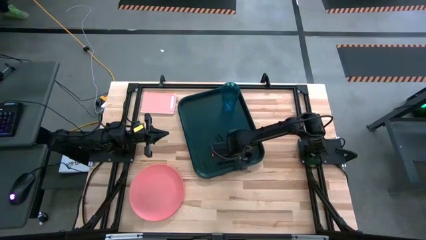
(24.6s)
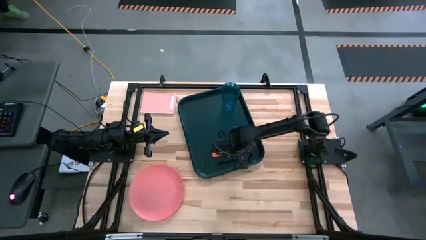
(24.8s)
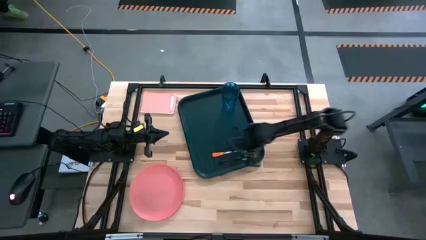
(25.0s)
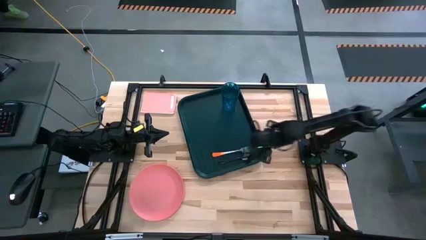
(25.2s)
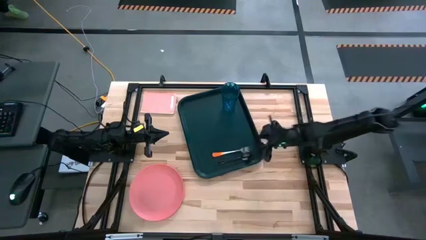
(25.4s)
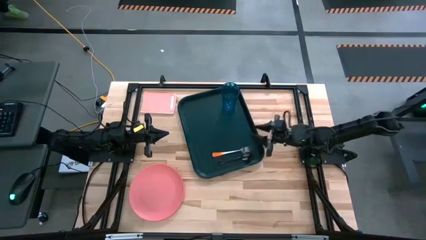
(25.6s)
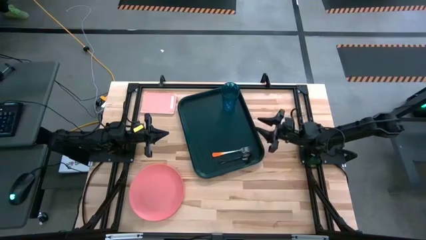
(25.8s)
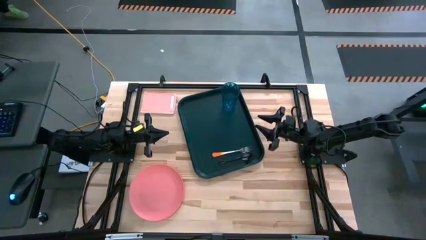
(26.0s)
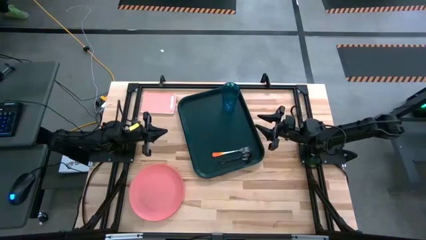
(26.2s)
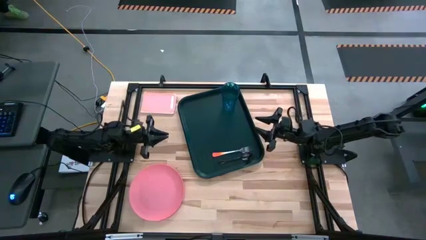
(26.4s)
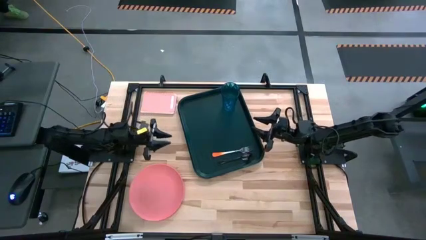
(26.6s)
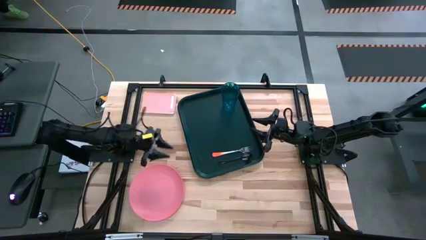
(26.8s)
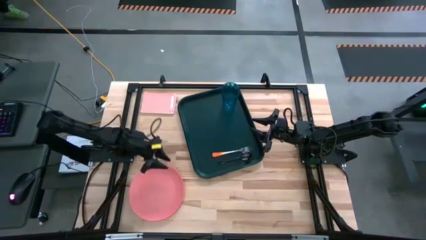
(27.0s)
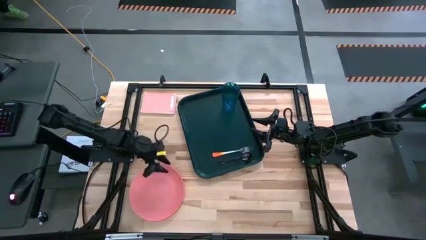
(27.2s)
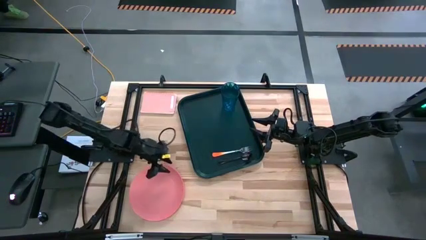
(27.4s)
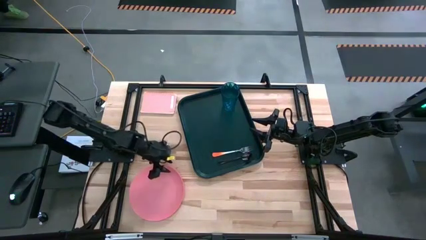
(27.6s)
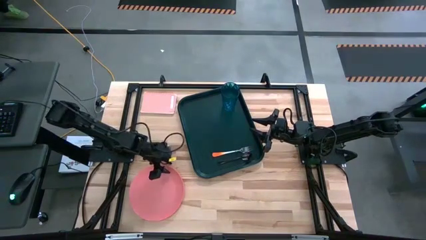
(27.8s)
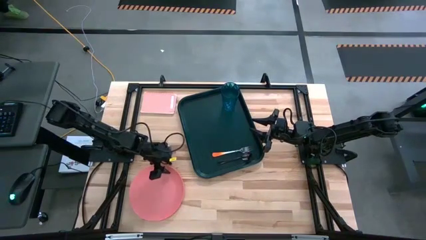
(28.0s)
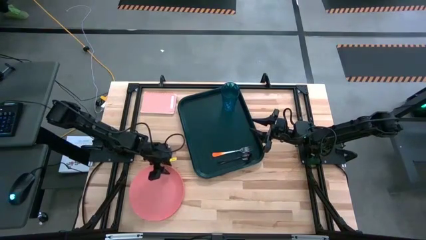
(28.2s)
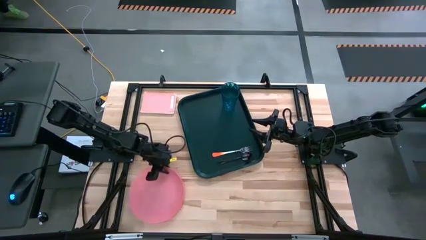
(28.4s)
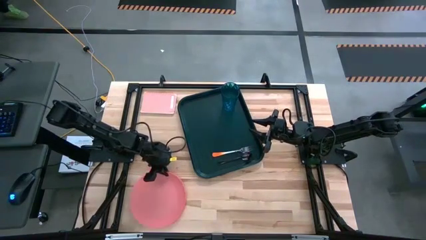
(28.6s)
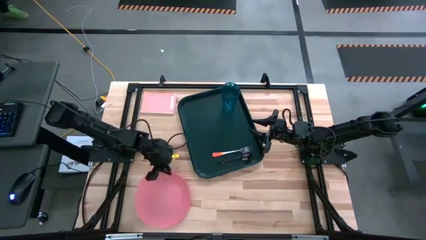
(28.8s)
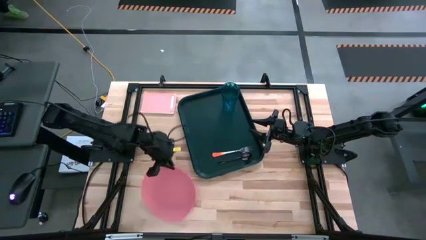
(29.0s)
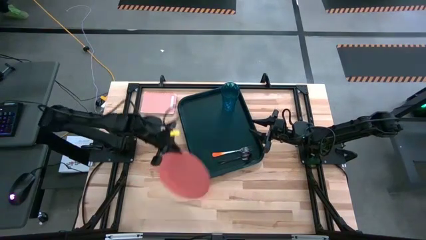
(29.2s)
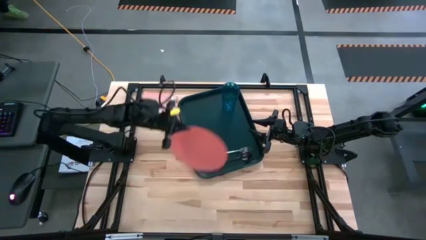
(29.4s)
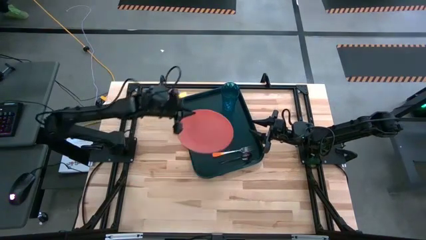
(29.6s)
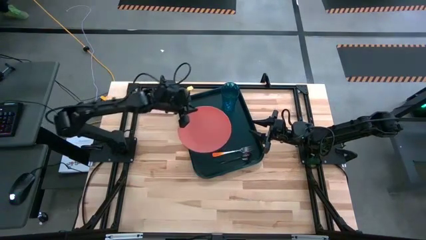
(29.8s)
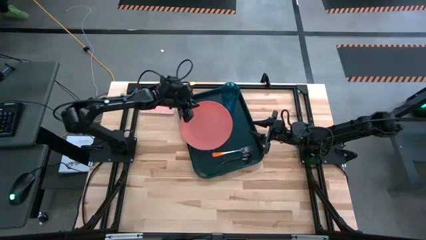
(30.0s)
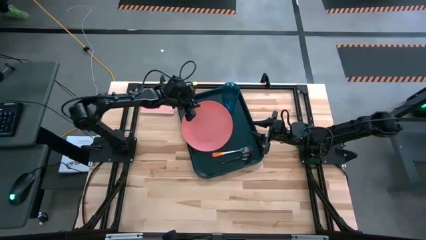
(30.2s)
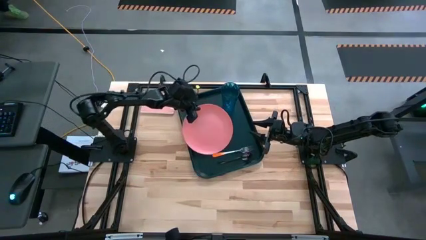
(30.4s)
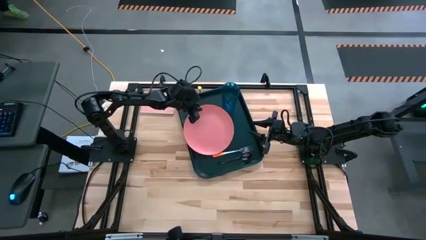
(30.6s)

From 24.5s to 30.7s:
Task: Pick and place plate/cup/fork/spoon on tray
Put the pink plate on the black tray to the bottom right of the blue cup

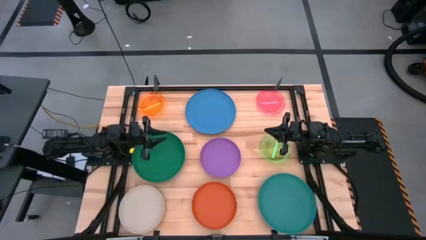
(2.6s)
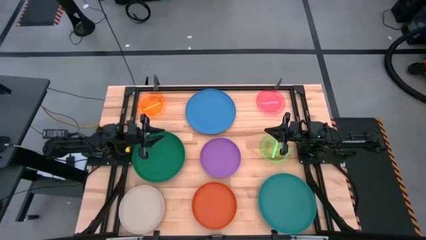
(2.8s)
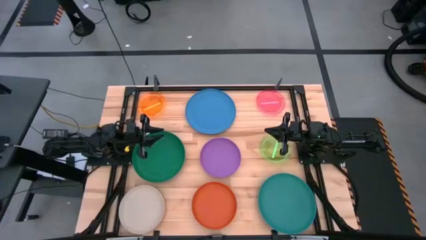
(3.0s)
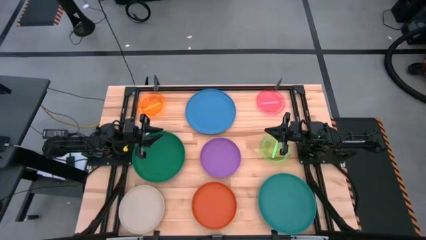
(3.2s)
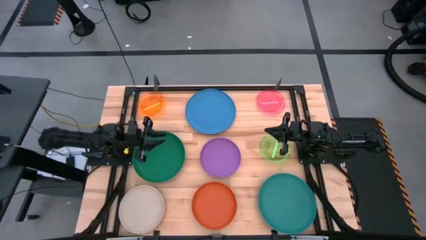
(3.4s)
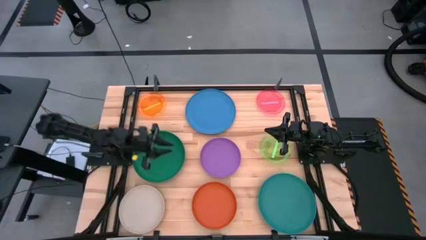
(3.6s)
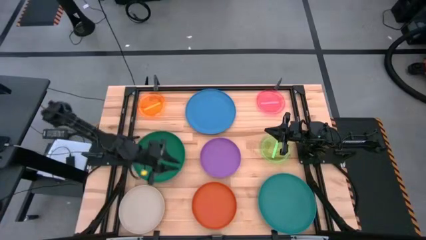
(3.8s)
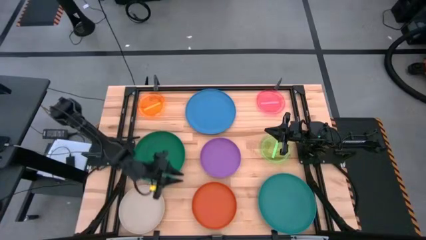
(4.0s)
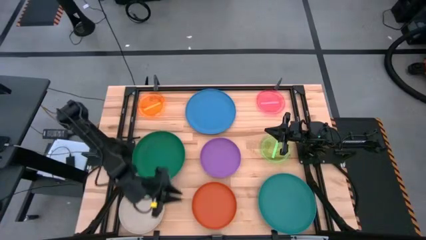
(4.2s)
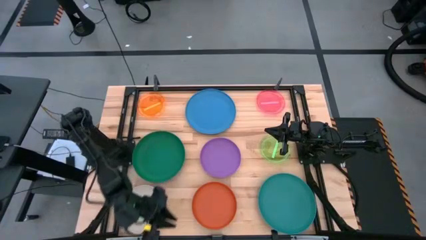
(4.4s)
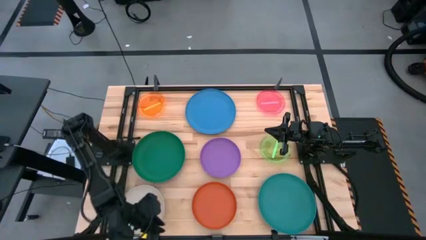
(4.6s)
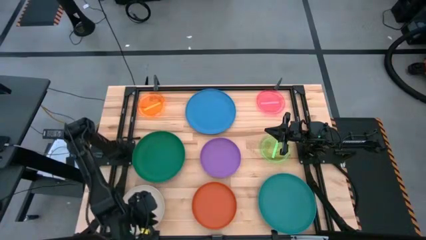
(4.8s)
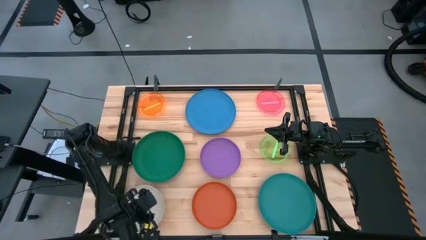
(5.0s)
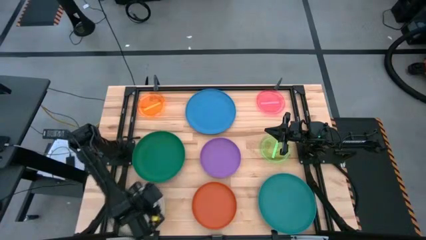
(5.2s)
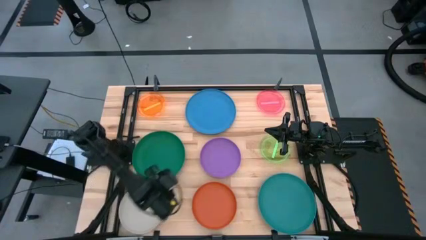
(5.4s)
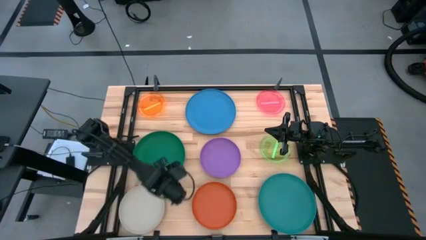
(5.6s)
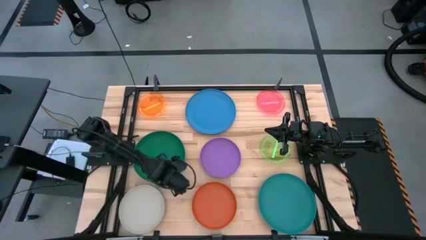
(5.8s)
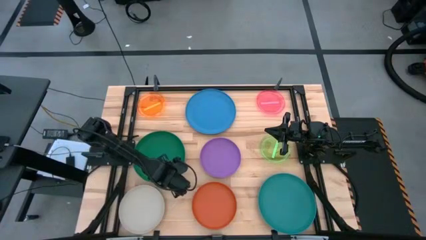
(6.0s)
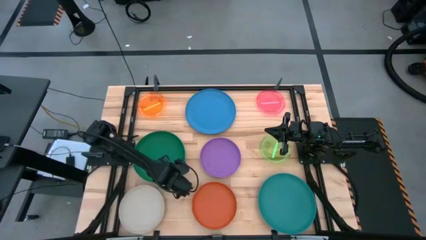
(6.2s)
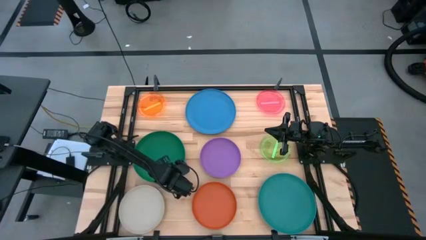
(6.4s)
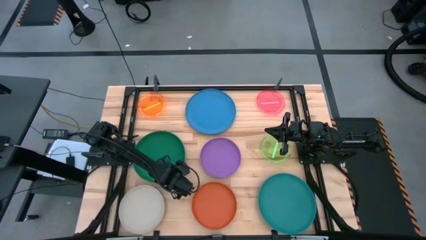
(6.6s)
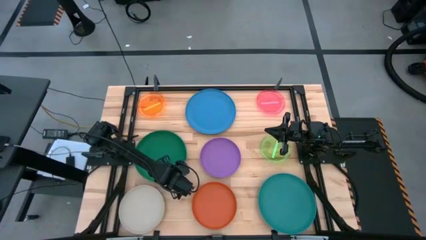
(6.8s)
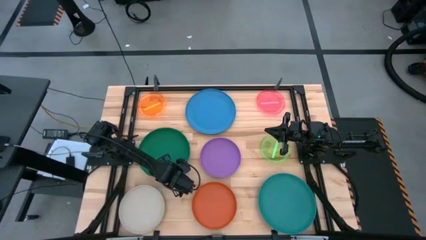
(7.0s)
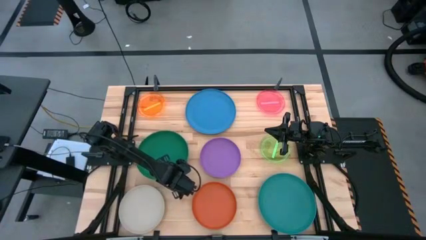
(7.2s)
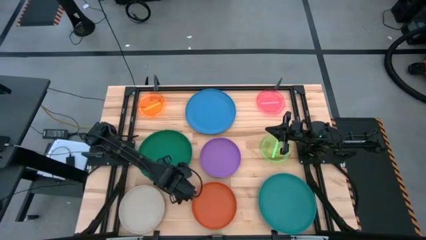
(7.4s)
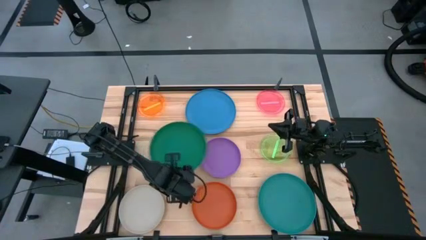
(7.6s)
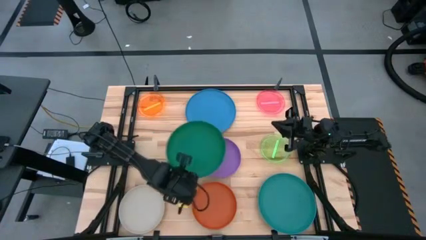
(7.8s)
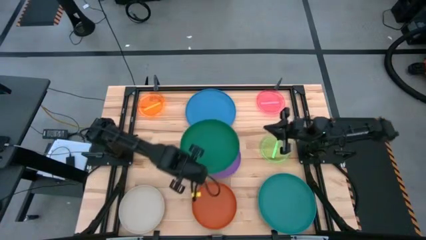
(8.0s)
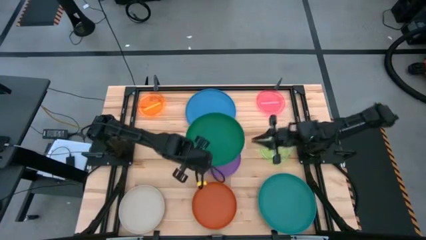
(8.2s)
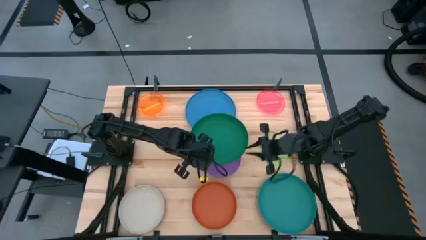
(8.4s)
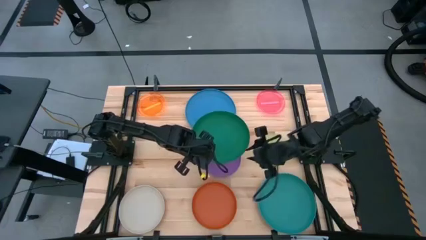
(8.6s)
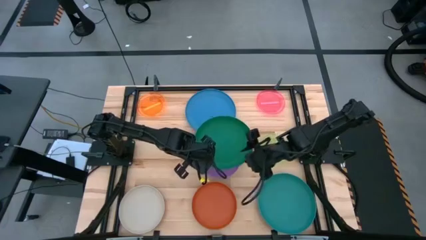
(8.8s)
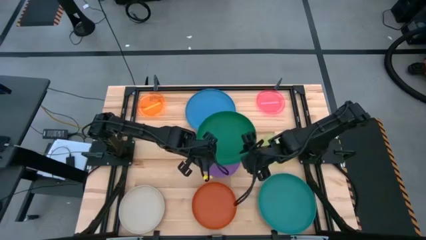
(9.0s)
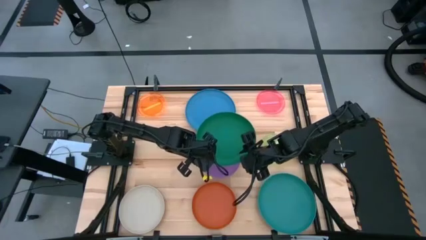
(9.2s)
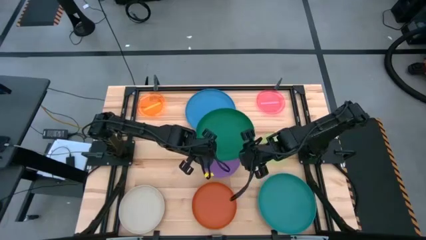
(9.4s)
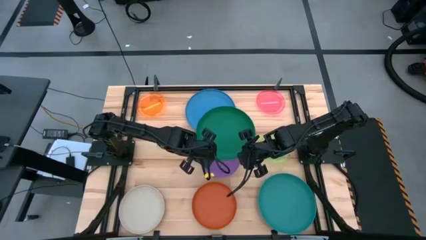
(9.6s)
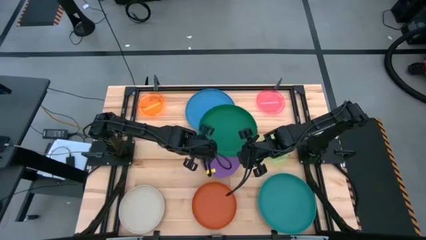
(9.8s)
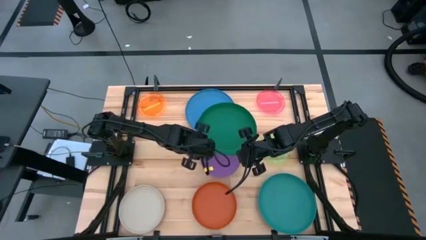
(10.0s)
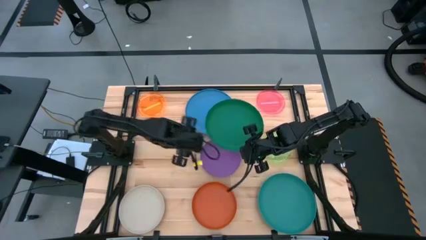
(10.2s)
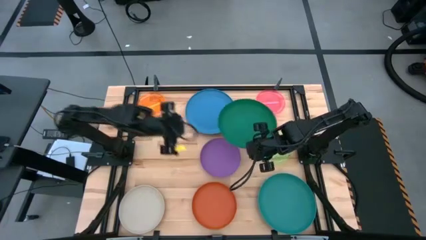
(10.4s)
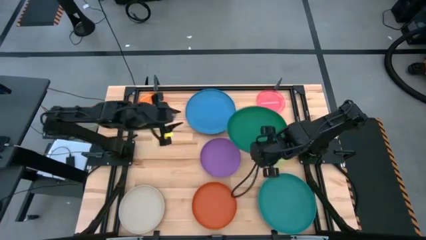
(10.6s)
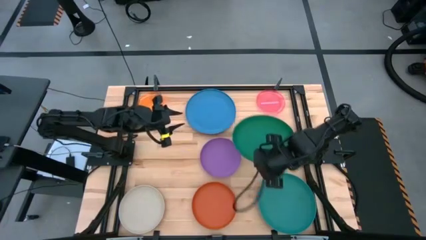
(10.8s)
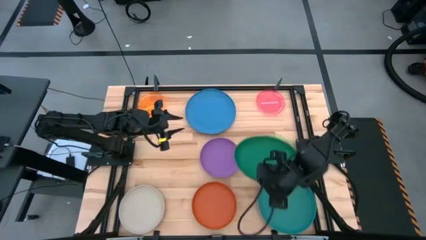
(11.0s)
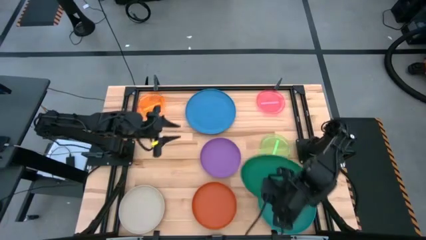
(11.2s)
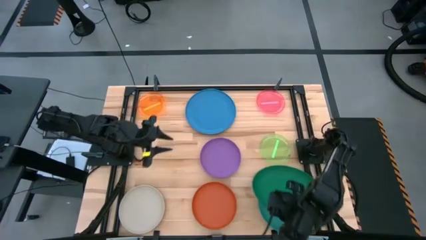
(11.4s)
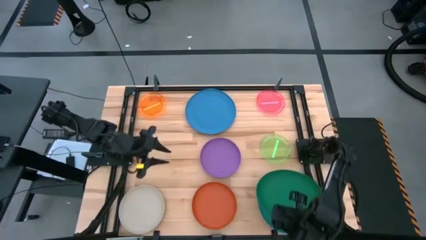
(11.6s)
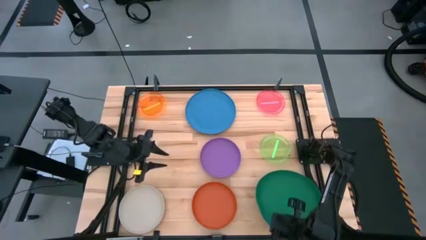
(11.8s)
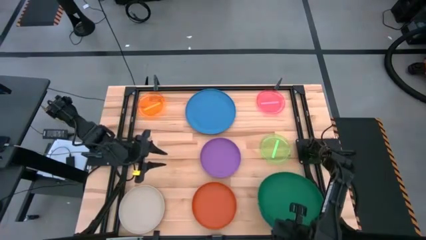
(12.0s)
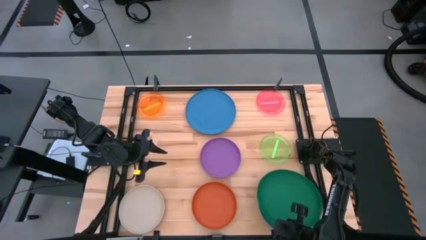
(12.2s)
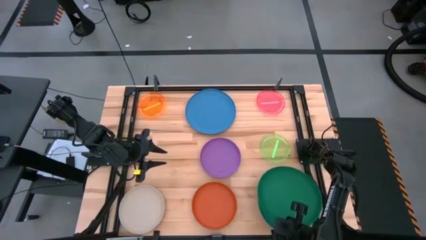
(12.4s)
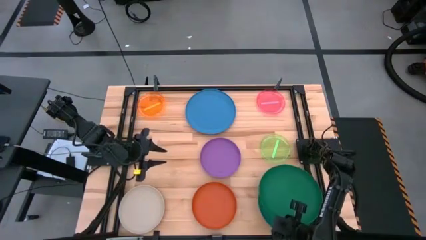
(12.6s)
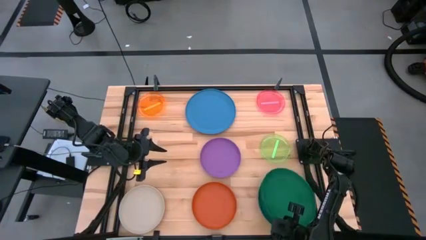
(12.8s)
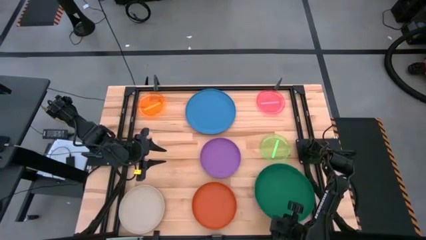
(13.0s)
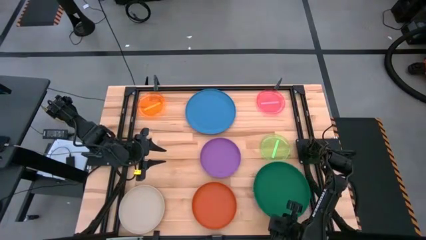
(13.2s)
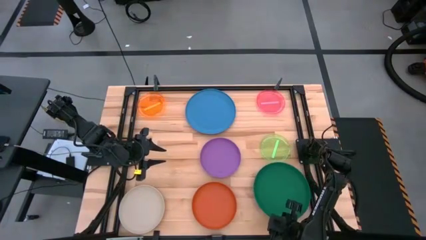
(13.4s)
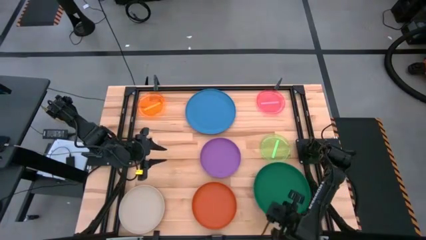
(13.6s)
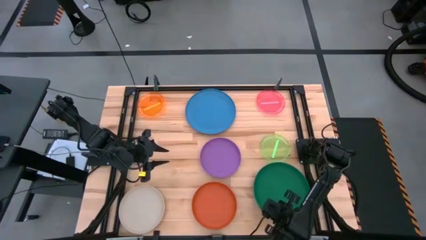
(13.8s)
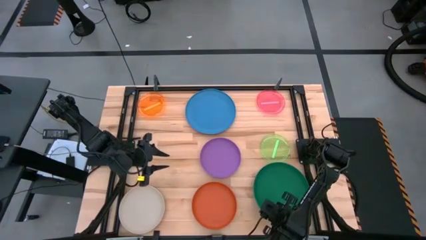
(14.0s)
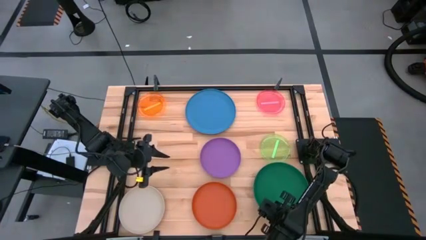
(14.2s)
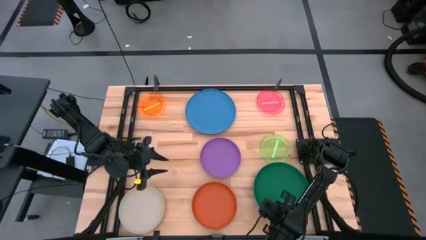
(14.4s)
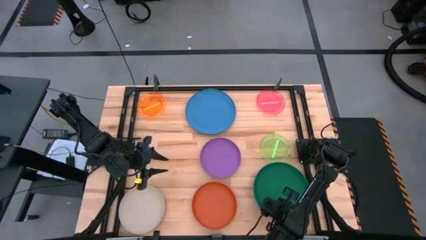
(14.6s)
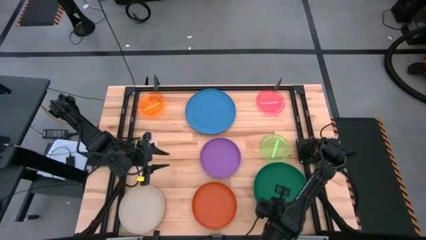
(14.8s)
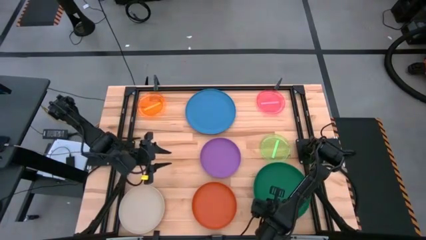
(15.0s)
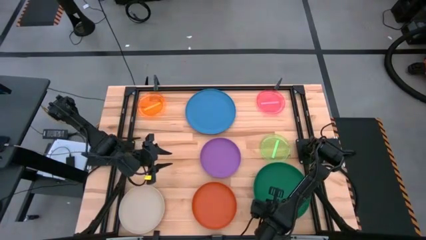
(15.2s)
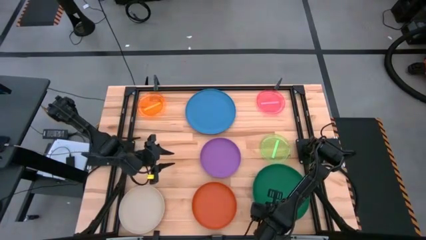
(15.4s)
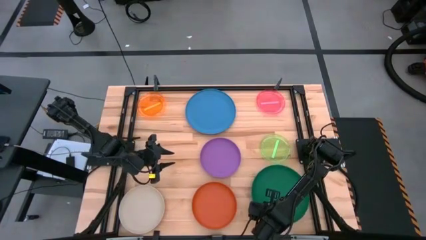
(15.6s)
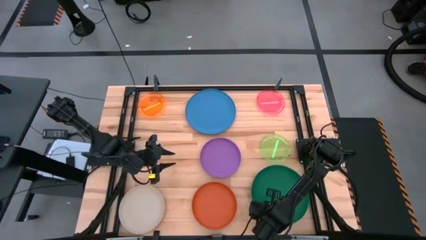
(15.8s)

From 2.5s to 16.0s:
Task: Stack plastic plates
Stack the dark green plate on top of the light green plate
